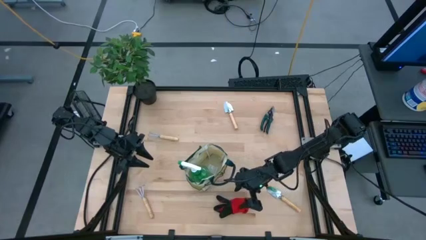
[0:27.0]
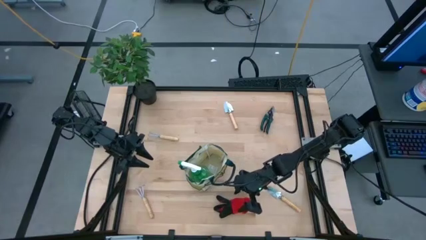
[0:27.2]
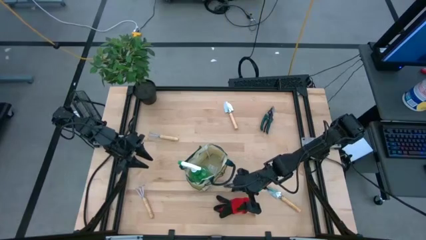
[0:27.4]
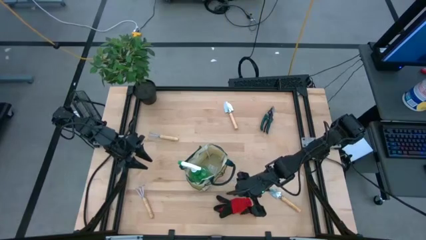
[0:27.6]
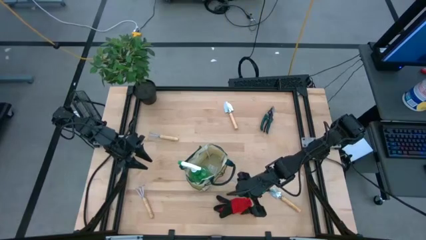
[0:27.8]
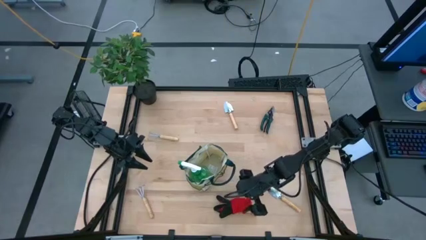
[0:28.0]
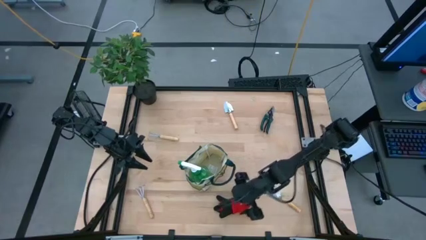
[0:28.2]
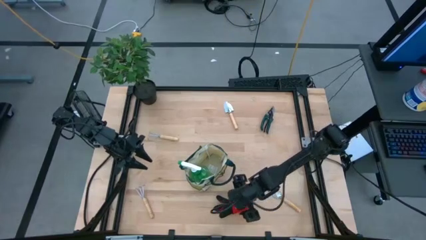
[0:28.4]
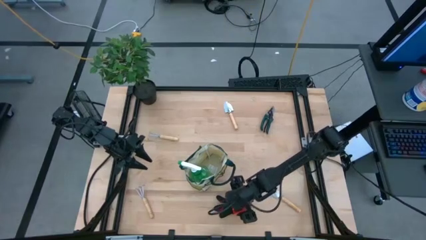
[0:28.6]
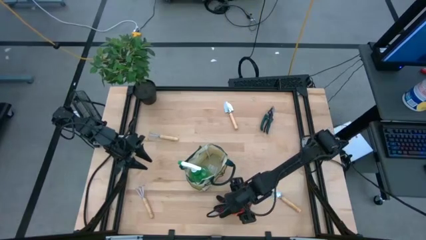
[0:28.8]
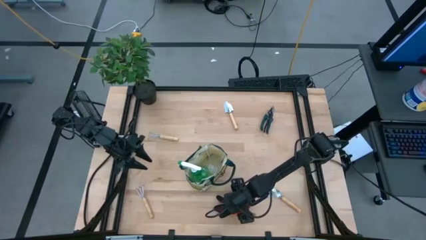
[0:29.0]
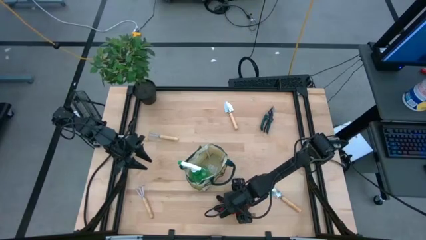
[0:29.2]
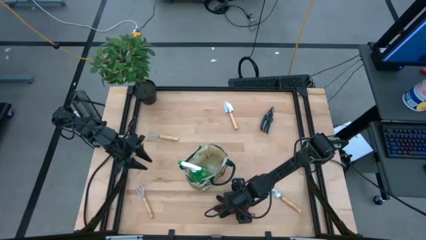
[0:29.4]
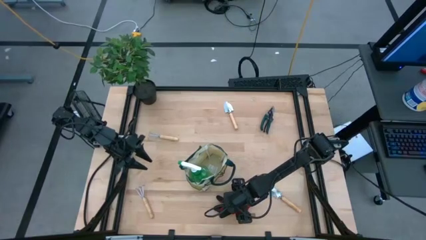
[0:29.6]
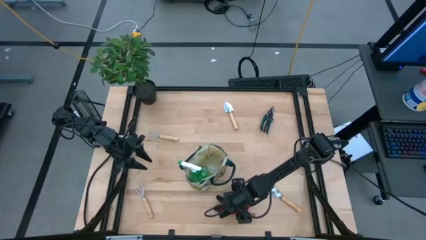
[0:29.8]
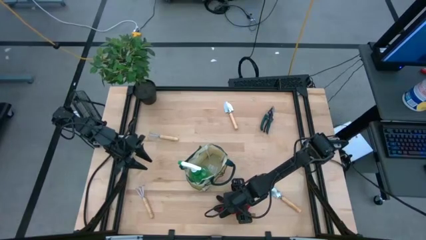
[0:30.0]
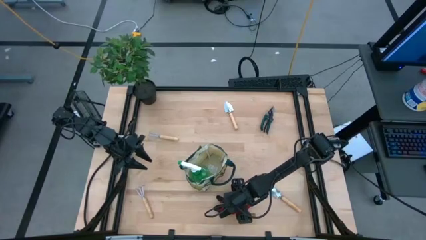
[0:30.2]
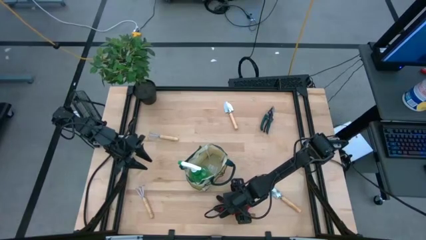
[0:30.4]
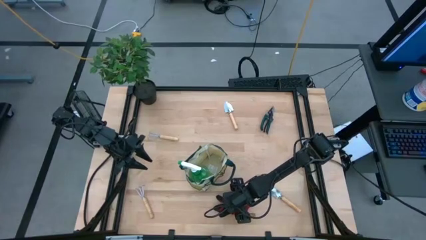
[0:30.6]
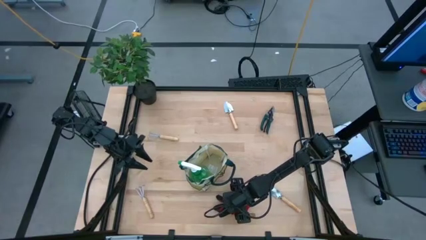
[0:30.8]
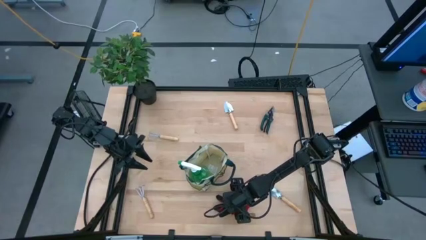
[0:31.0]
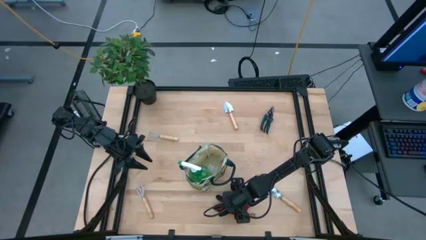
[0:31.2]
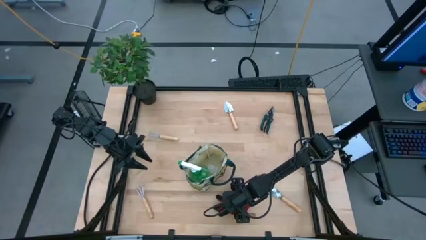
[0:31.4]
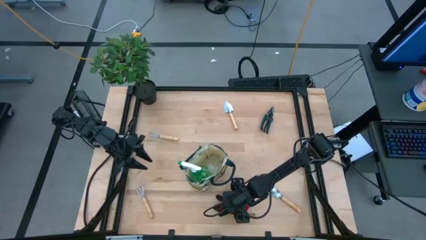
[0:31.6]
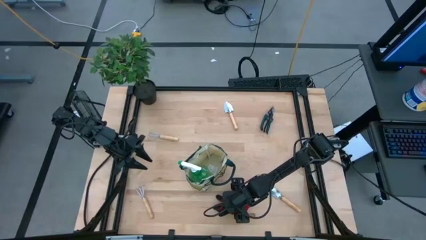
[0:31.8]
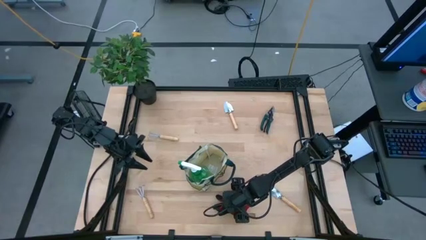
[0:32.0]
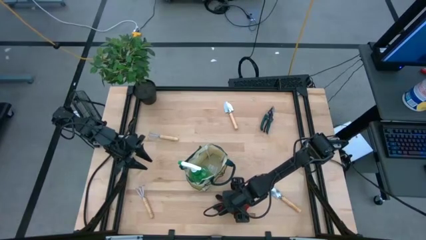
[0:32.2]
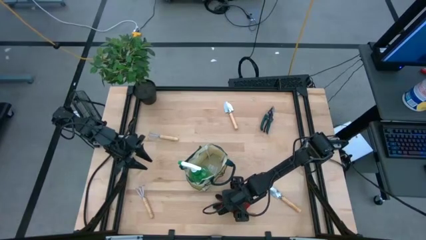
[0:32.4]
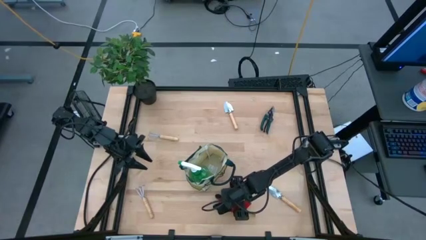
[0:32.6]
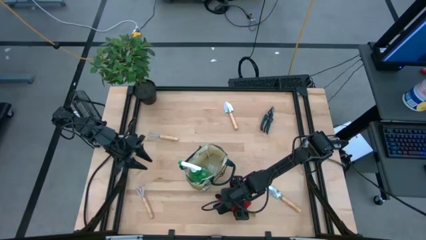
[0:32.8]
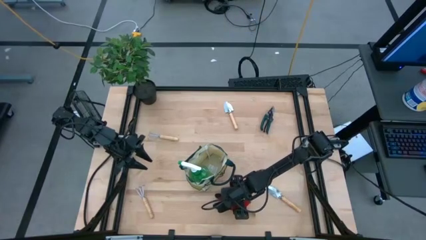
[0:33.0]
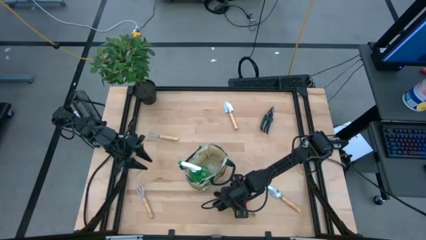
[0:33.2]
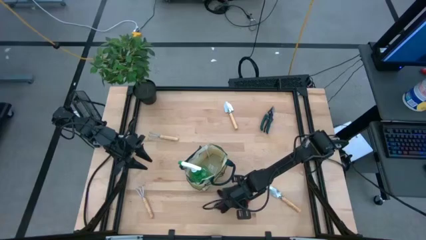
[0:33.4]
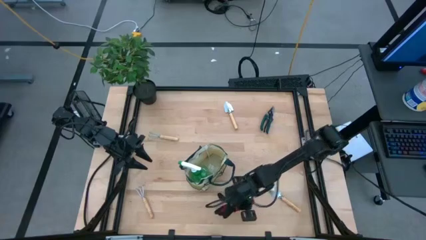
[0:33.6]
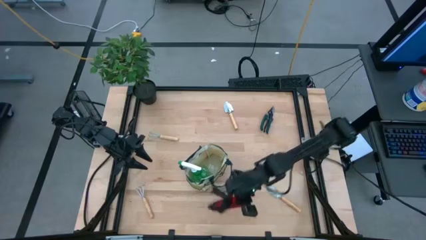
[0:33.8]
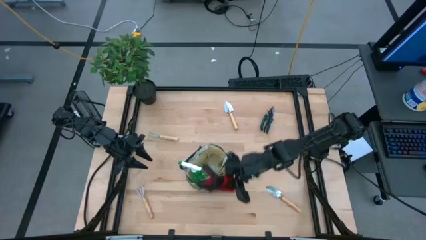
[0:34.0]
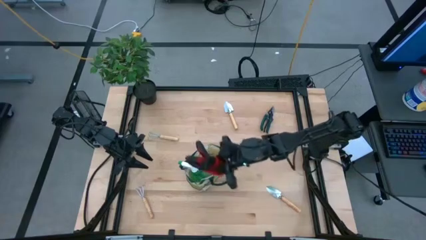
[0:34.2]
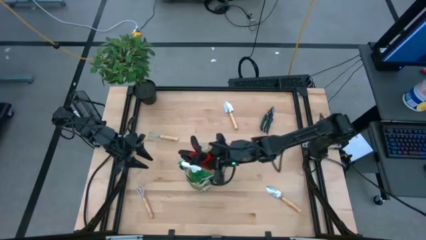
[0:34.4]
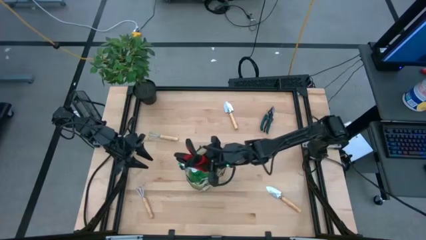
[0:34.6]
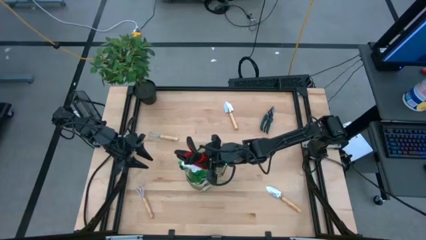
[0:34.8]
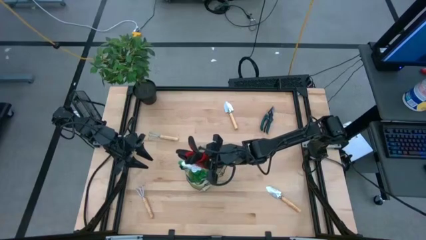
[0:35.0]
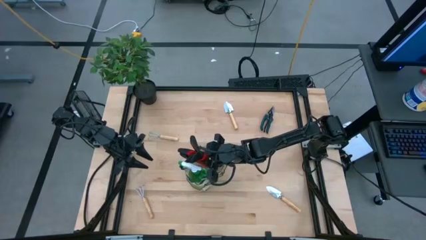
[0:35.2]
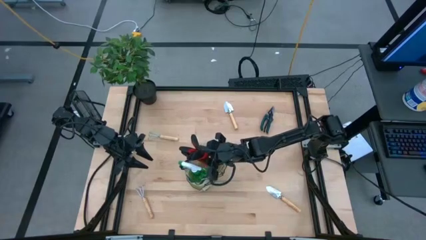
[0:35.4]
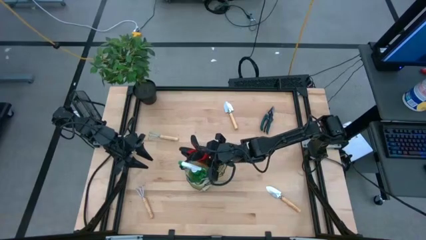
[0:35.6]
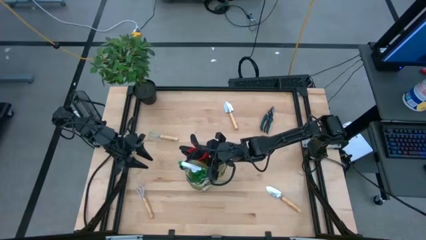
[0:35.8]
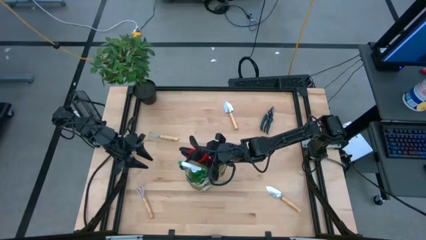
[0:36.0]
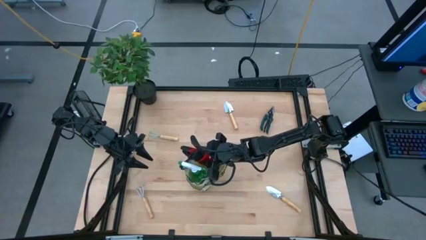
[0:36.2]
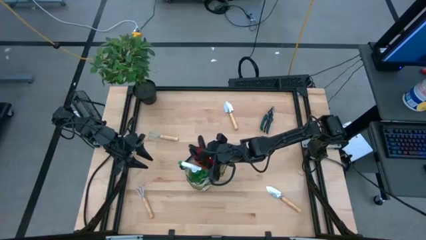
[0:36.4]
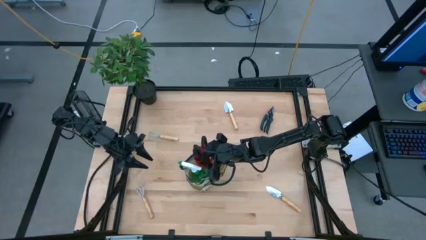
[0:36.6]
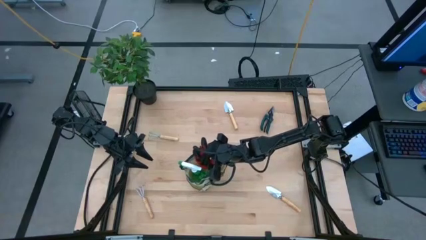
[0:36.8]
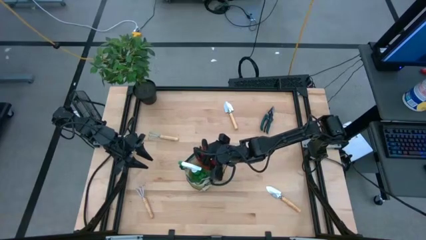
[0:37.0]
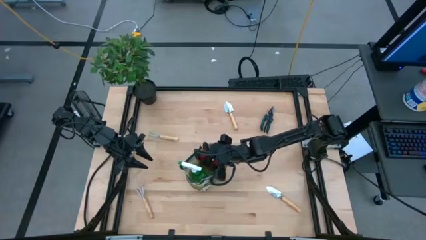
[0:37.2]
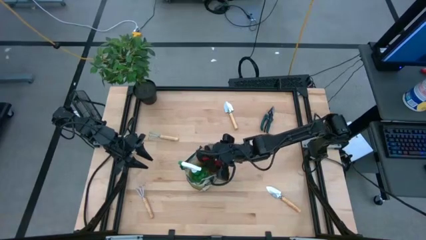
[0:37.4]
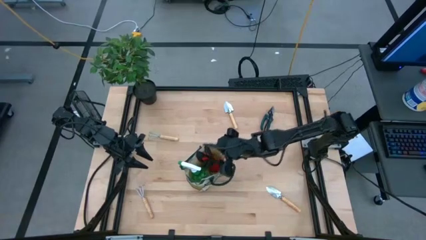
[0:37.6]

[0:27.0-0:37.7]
Task: Pick & Place Garden tools in Gardening bag
Put the gloves into the gardening bag

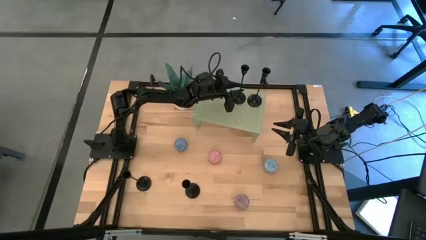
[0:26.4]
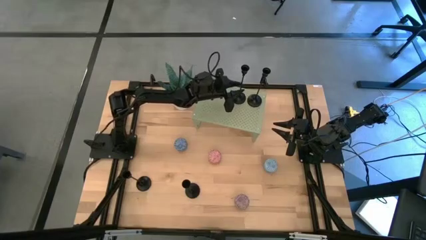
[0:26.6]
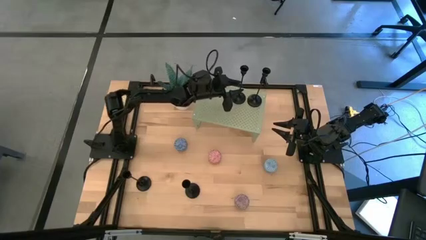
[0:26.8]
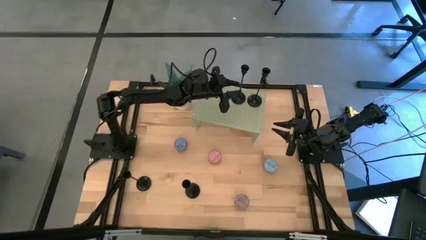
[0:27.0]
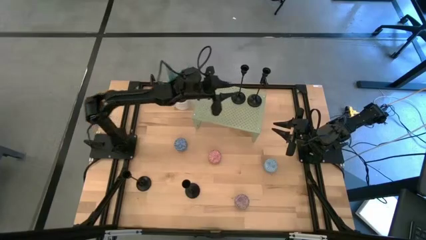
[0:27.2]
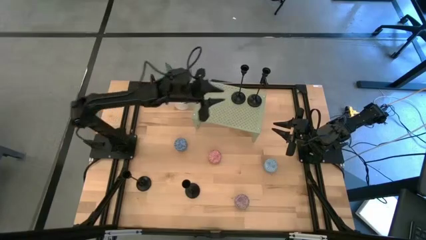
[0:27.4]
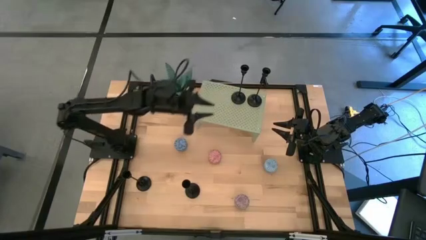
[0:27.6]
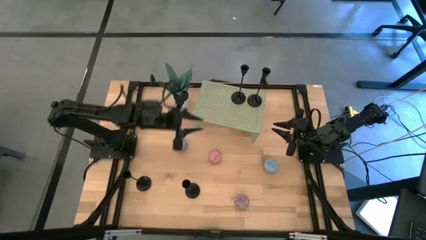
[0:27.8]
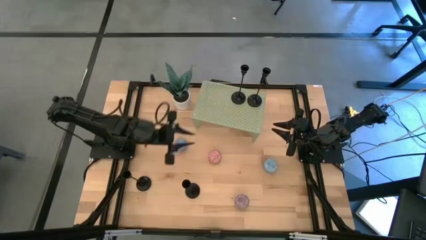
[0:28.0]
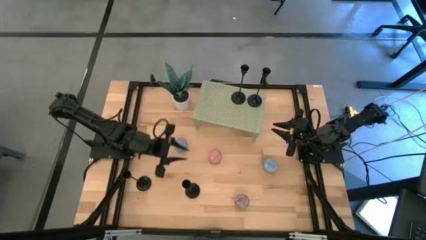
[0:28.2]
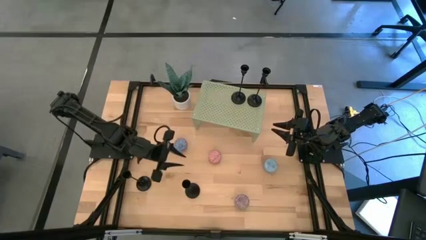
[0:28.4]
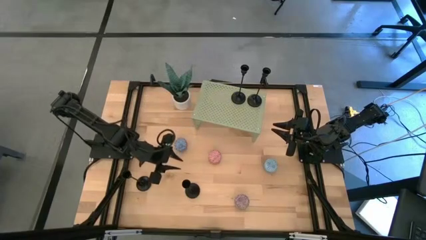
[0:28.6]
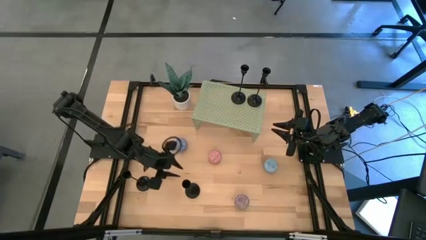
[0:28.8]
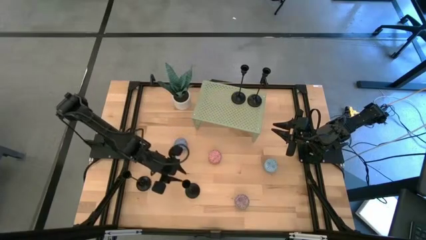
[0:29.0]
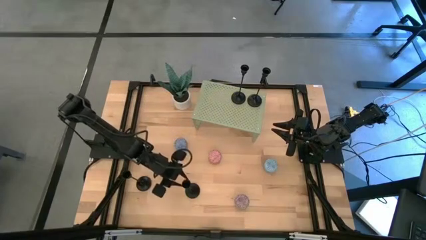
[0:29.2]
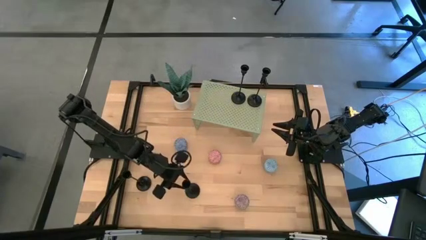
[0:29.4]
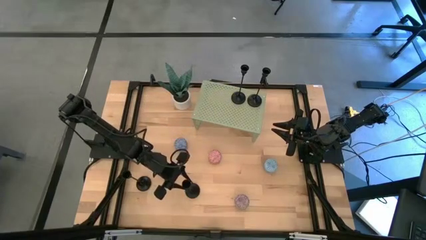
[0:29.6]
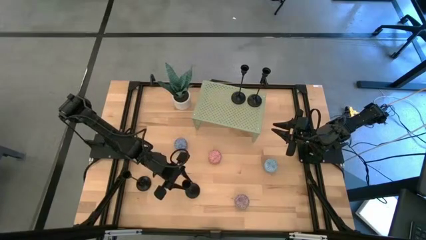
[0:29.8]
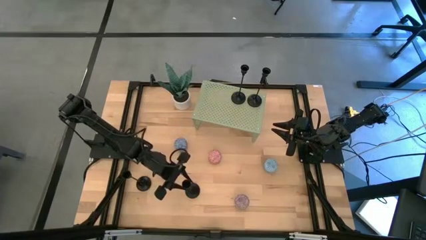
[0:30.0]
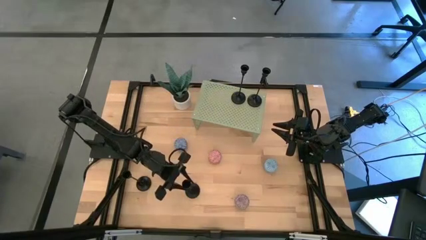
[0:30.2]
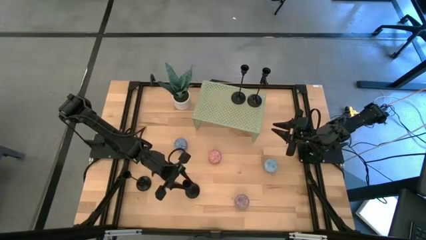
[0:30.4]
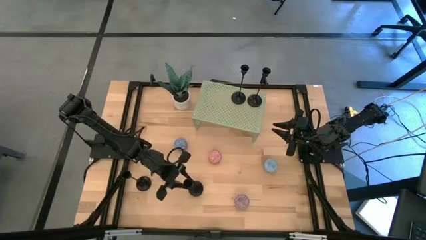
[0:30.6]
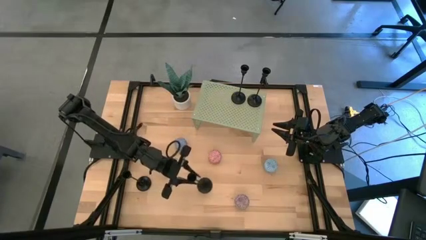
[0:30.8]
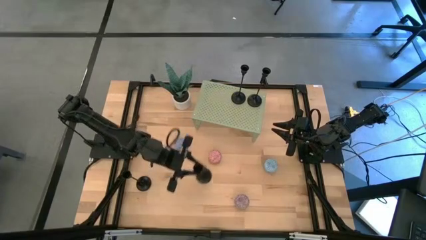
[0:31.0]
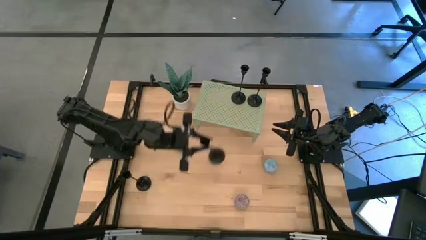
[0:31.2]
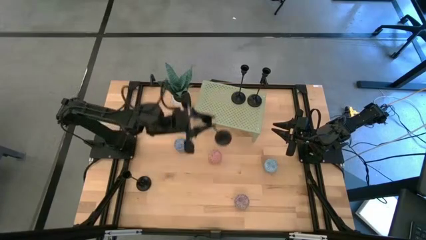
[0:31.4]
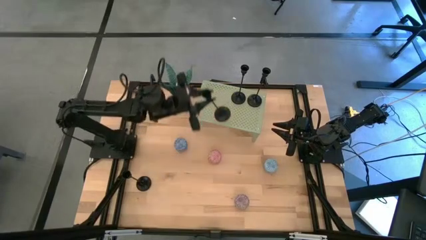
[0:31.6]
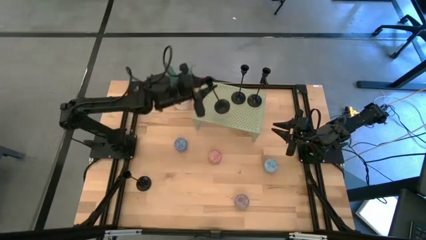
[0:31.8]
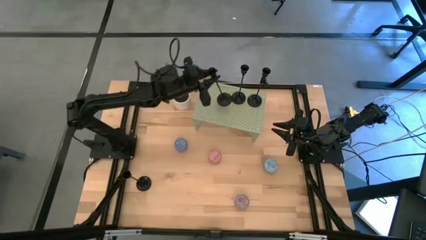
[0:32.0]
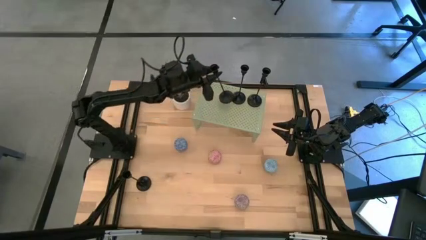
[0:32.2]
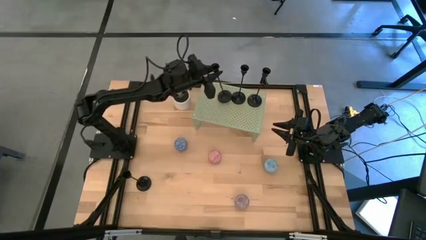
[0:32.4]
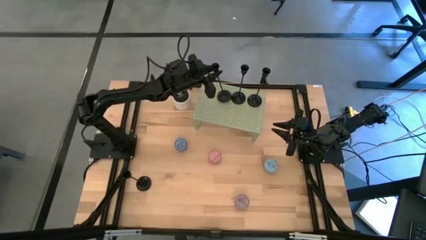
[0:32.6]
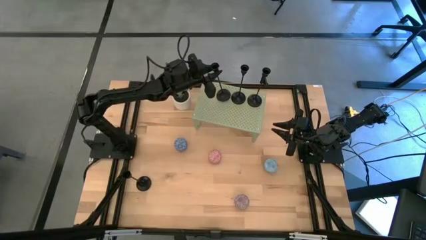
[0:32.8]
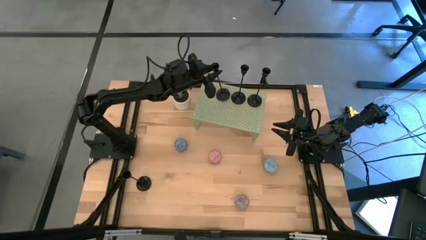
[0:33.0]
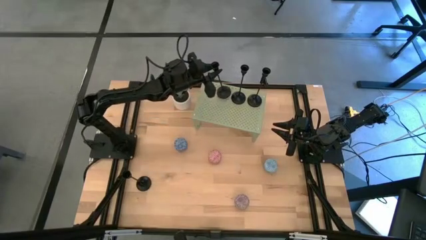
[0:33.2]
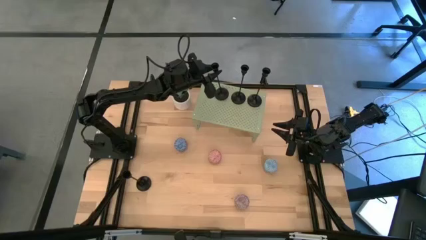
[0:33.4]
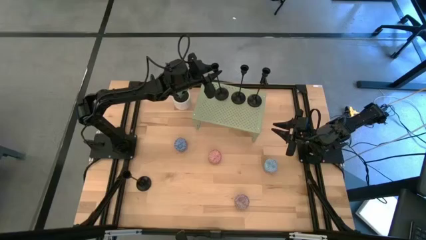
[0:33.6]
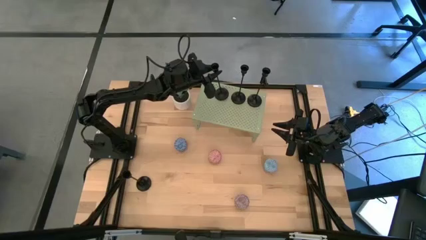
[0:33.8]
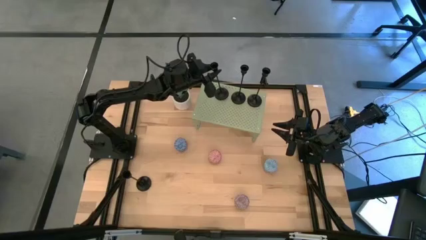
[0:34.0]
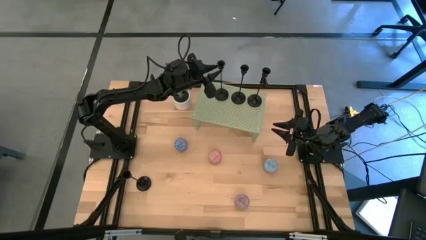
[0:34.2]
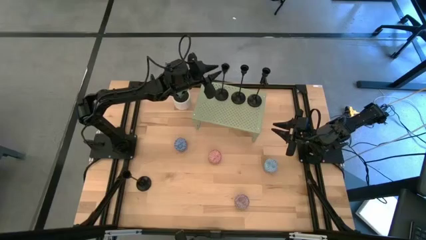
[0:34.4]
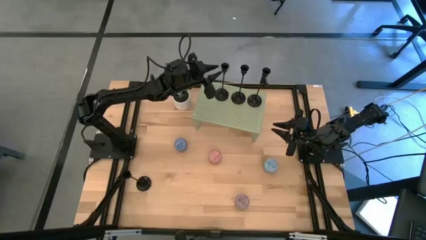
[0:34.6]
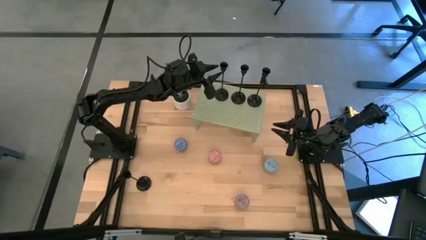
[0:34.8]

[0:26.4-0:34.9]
Task: Pick & Place candle stick holders
Put the black candle holder on the shelf aligned with the other black candle holders
